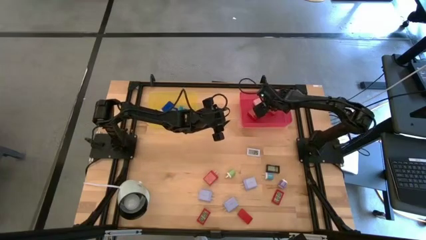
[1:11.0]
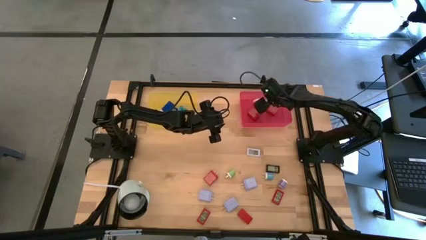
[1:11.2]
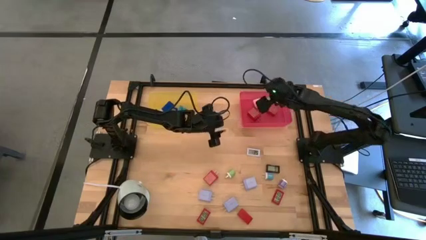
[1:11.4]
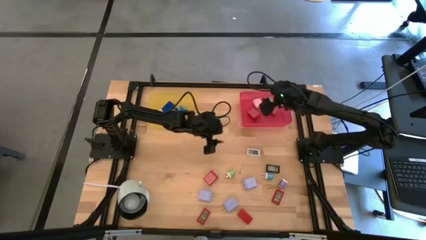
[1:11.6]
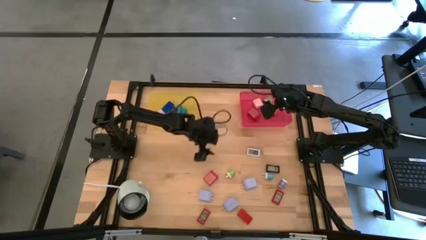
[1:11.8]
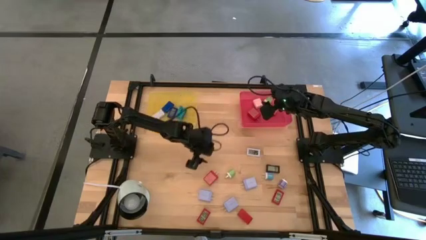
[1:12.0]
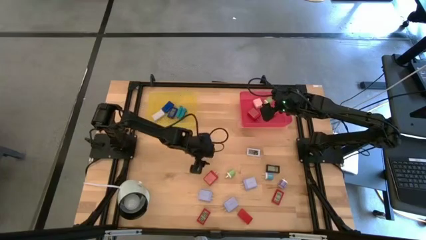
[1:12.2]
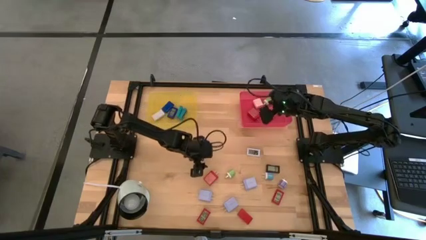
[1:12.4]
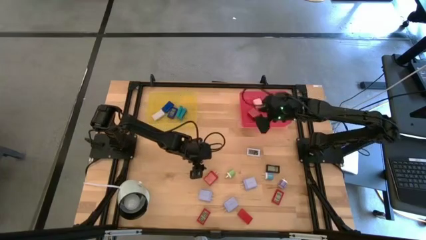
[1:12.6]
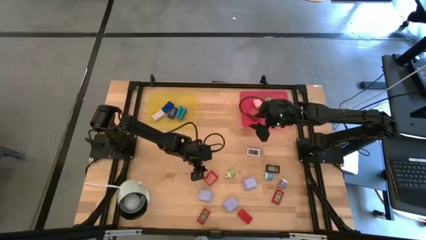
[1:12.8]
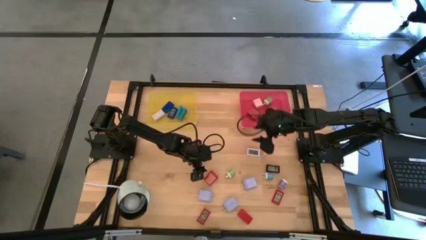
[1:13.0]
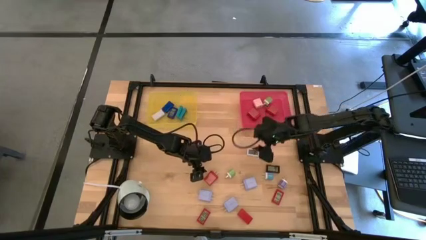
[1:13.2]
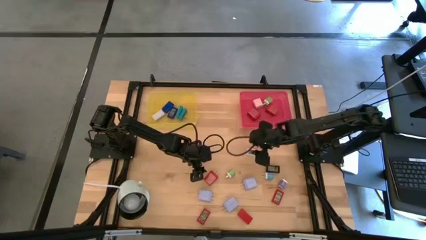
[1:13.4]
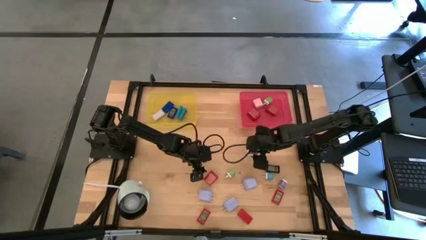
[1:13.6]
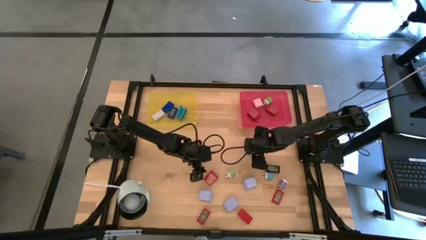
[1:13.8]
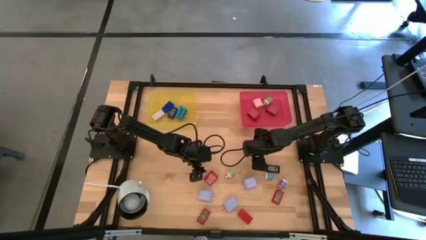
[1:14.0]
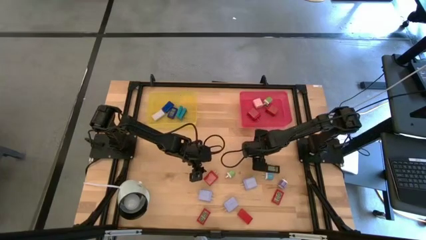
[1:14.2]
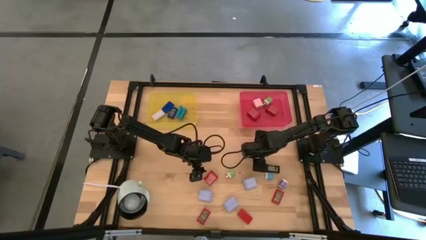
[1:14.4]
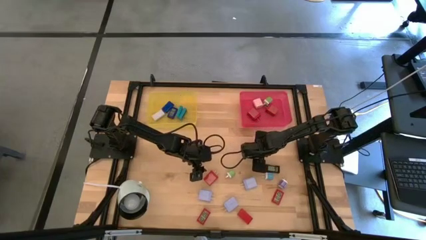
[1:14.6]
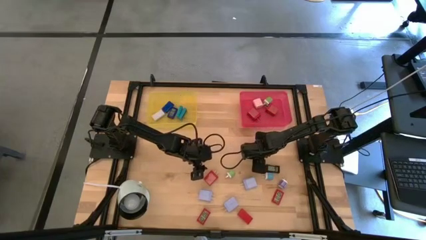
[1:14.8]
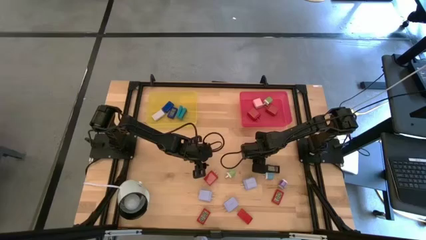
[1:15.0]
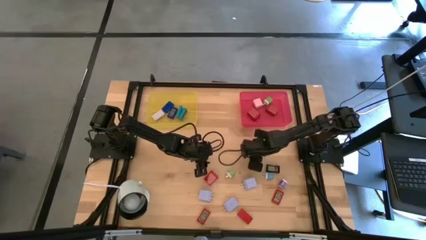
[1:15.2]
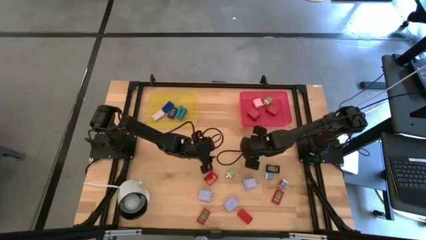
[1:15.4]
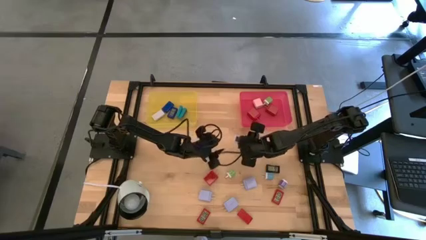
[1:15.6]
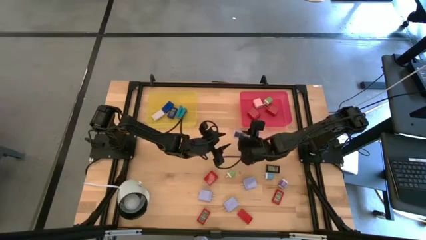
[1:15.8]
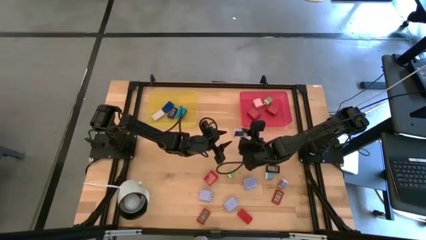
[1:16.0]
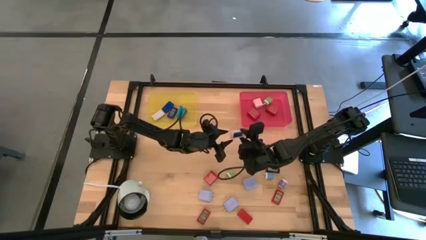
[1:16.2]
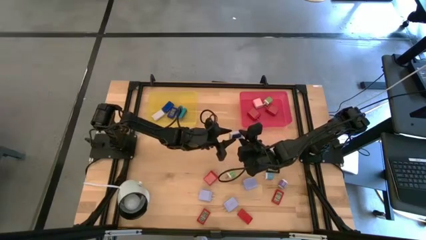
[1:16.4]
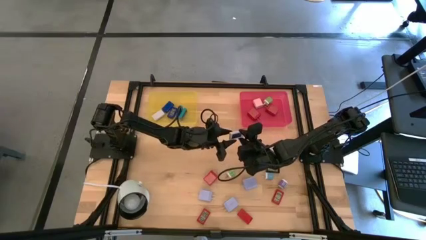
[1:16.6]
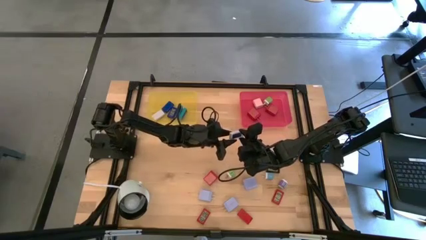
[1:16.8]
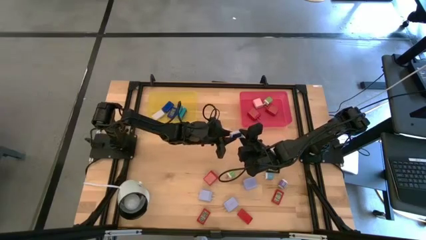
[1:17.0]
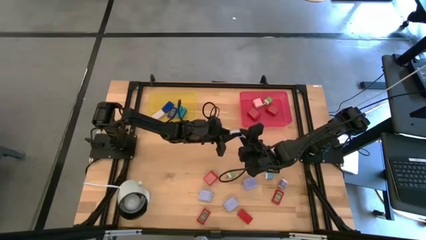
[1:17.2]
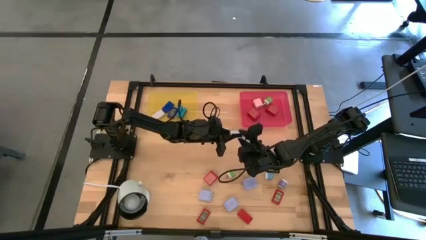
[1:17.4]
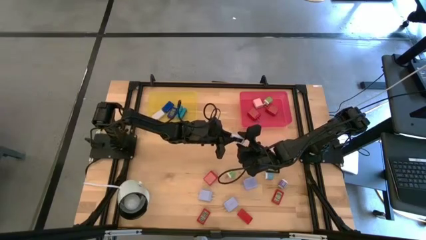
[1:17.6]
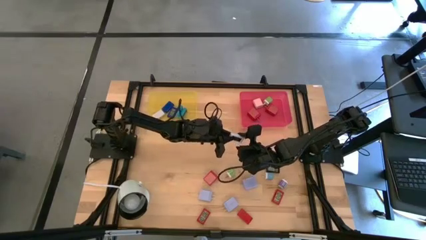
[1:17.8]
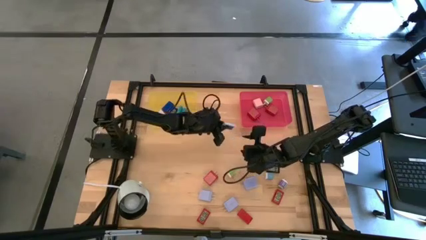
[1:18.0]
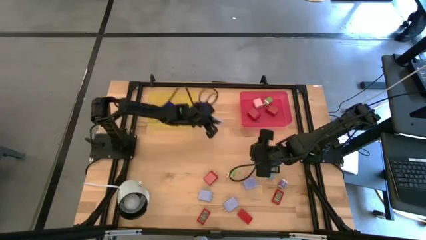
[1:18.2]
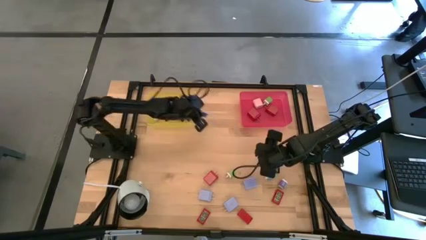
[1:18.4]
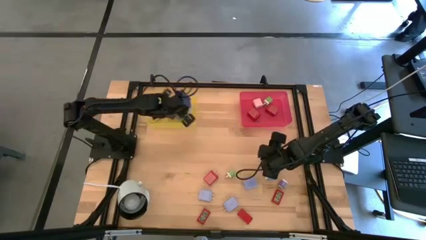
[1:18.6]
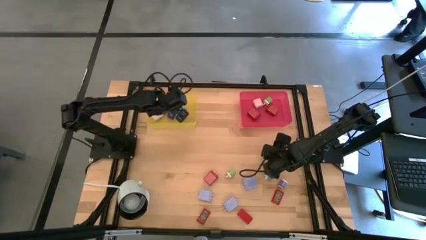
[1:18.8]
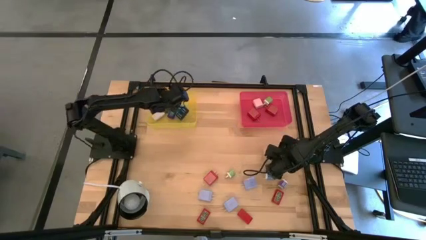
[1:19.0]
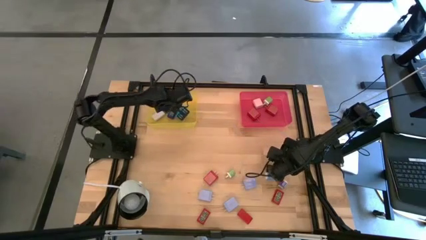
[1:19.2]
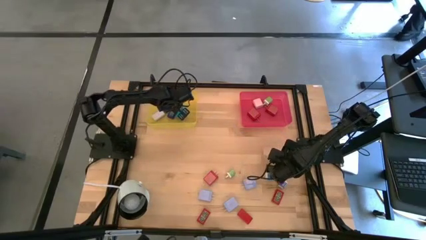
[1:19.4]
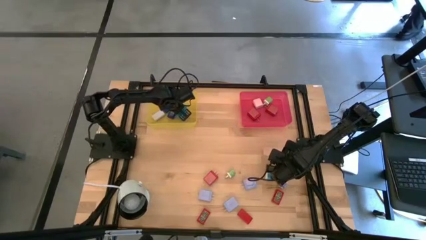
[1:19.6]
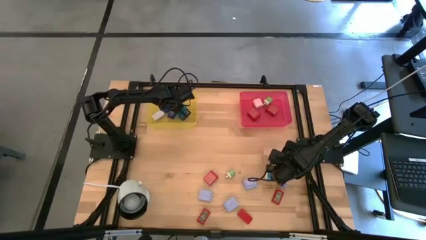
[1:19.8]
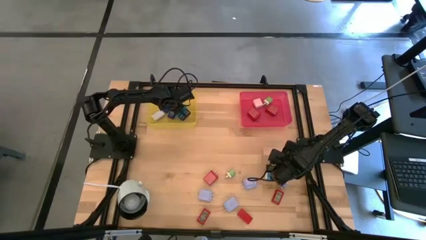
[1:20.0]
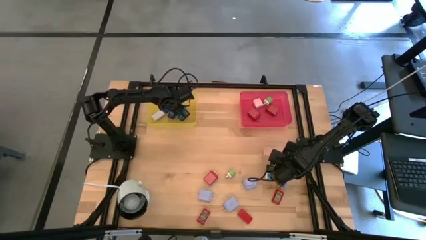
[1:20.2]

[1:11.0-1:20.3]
Task: Pick & Place Office items
Put the white digital clock into the yellow bin

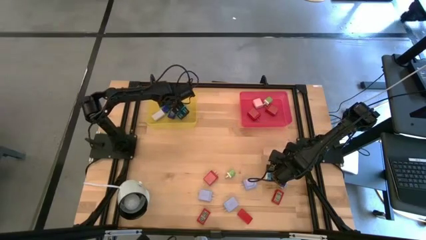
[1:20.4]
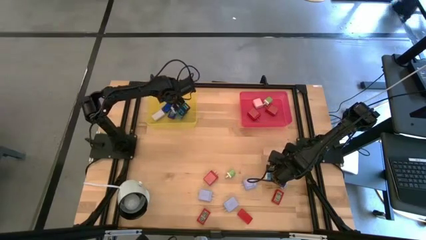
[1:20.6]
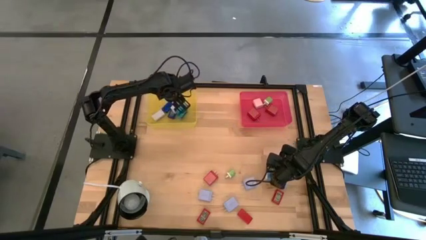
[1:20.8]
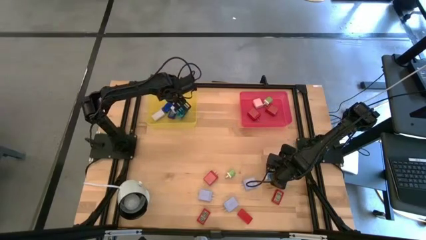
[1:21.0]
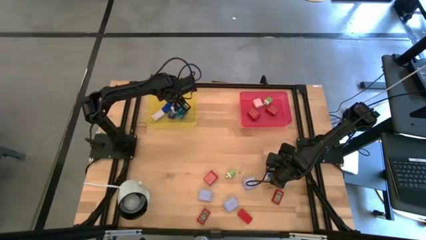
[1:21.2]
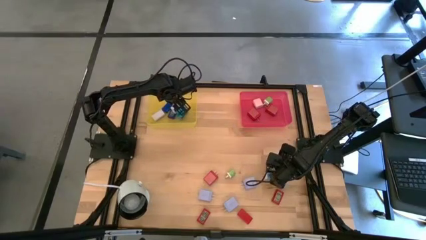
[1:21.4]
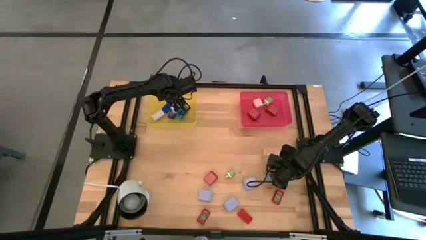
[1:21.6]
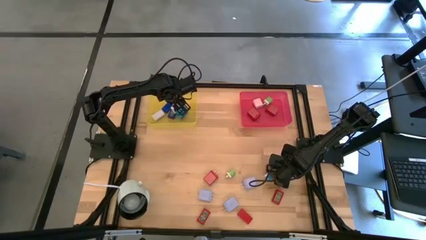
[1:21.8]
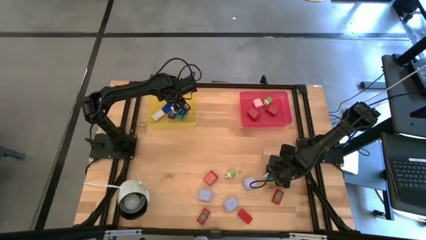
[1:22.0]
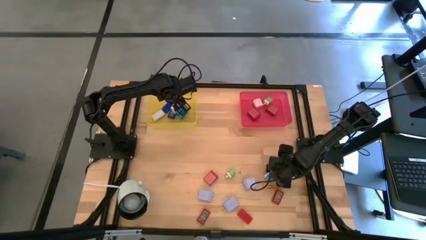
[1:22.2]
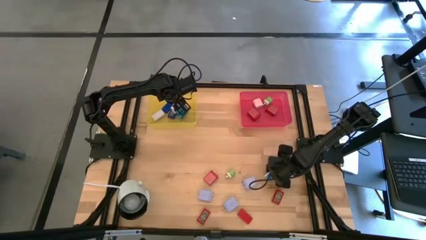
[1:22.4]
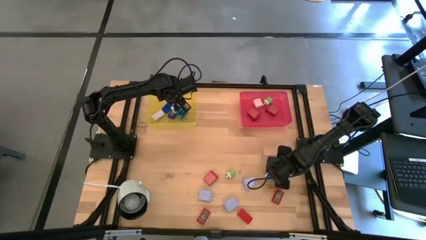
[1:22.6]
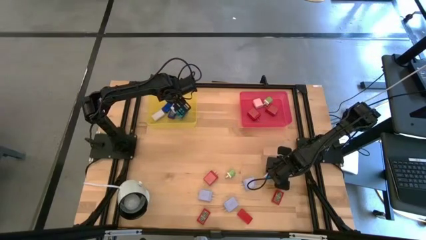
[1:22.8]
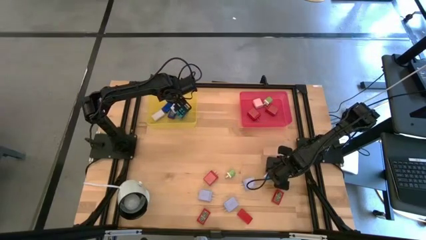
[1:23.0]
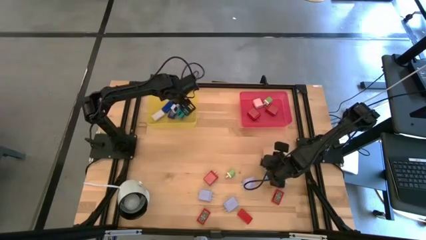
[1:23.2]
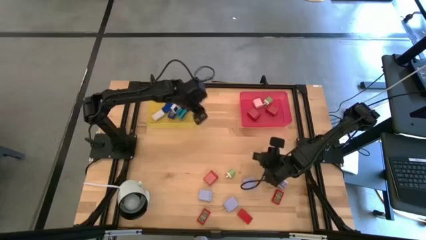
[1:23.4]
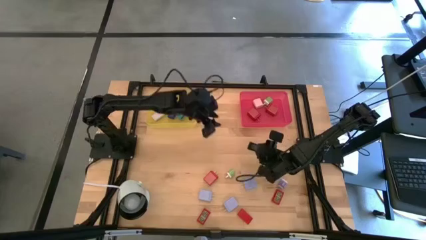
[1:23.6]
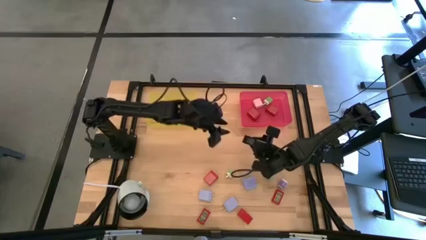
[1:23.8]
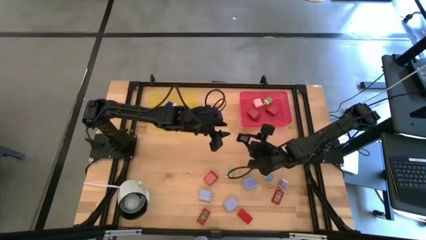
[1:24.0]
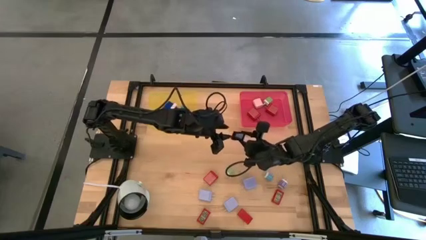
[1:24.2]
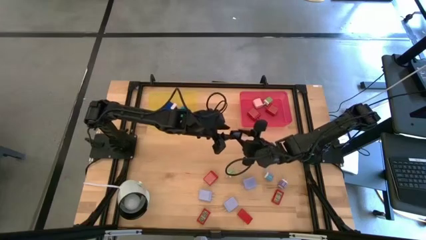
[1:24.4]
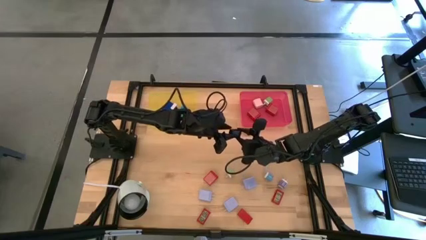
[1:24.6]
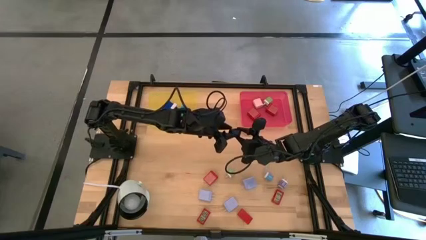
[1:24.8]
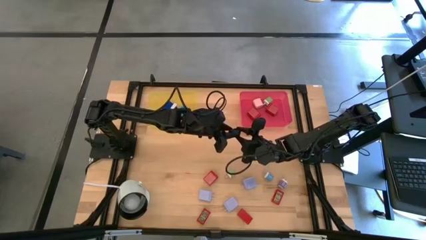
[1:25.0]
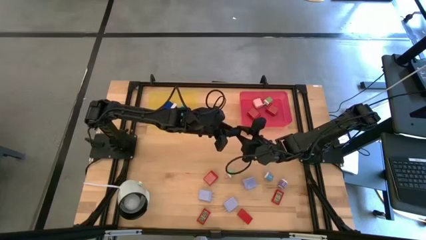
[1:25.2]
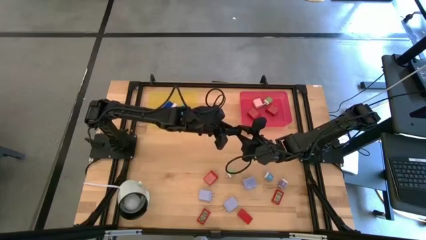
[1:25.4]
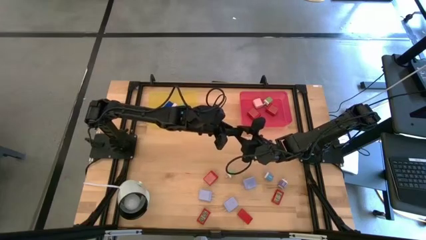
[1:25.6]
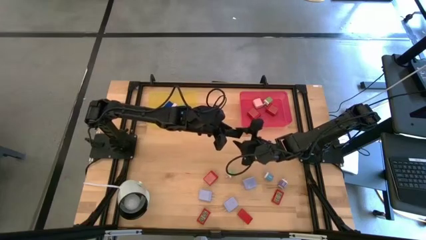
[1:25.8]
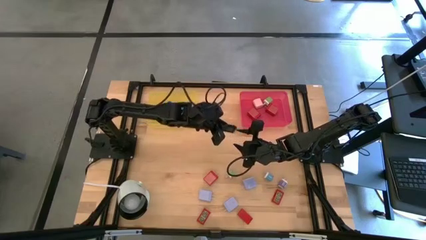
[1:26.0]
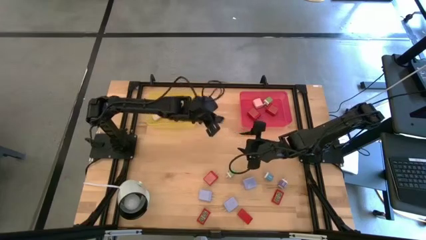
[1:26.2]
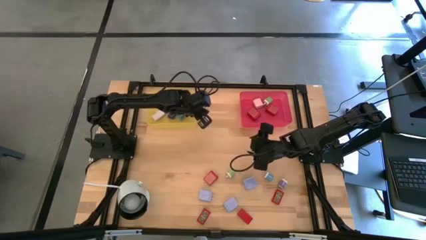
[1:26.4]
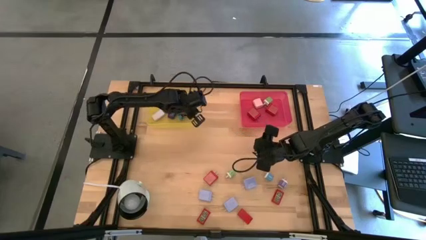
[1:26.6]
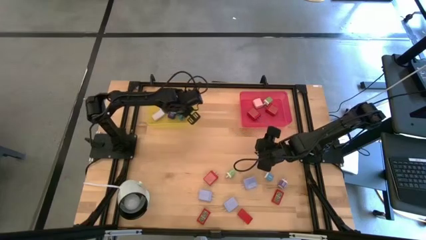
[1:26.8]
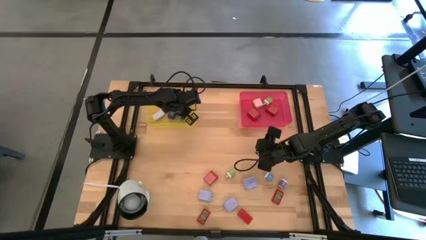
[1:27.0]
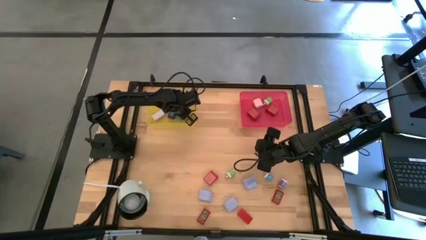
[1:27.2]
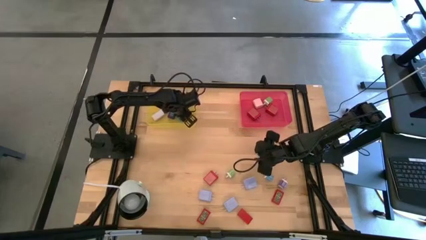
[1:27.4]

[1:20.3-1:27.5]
Put the black digital clock into the yellow bin
